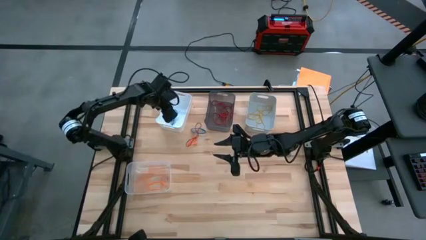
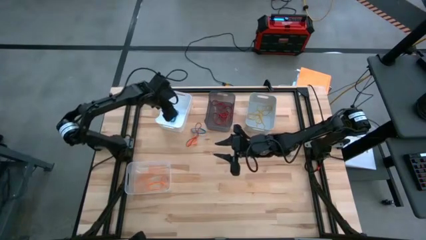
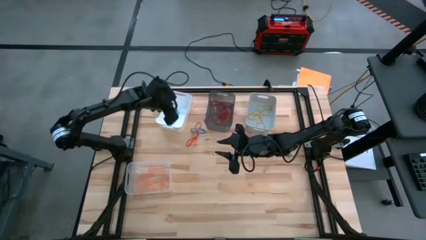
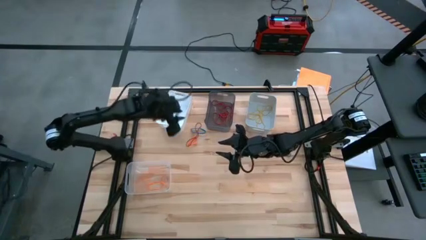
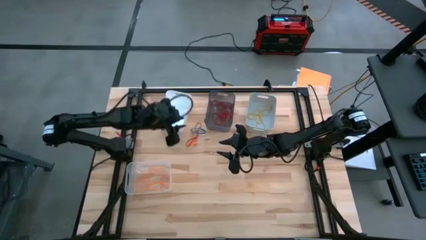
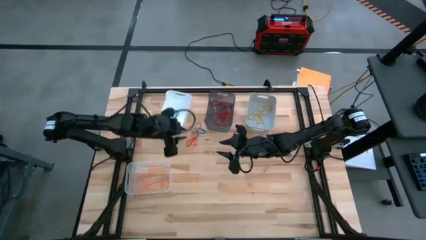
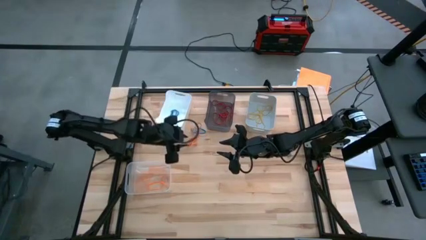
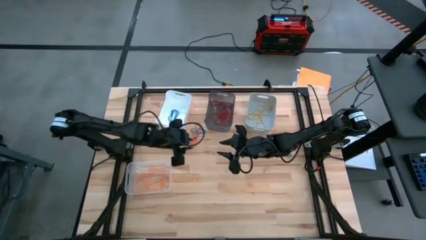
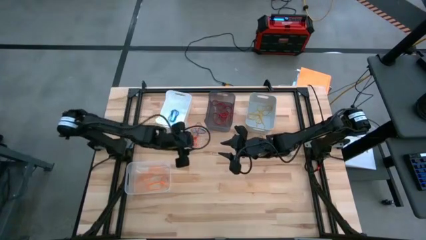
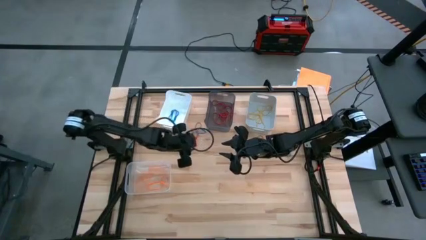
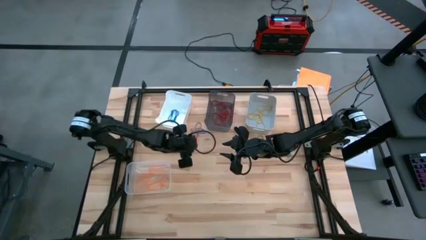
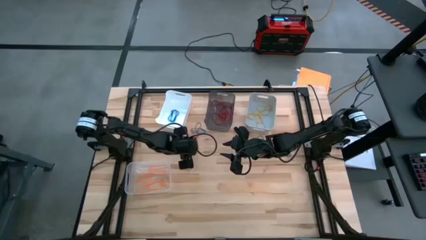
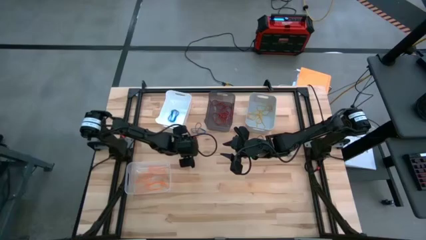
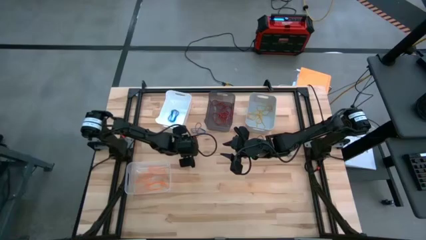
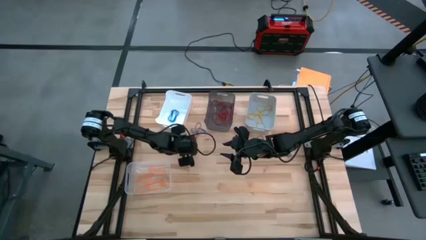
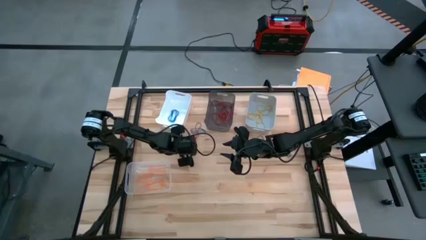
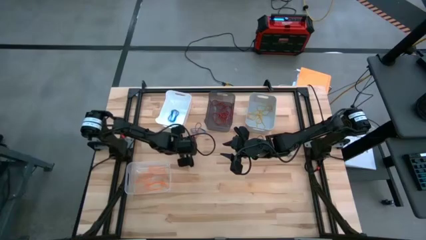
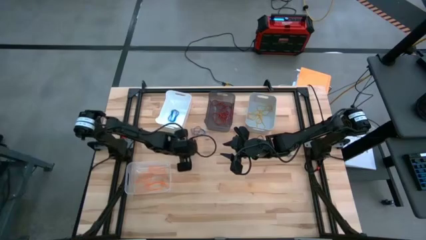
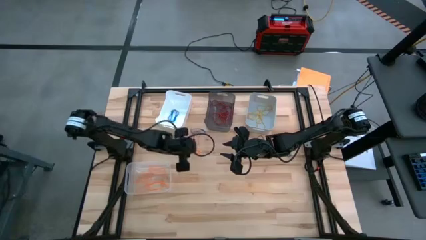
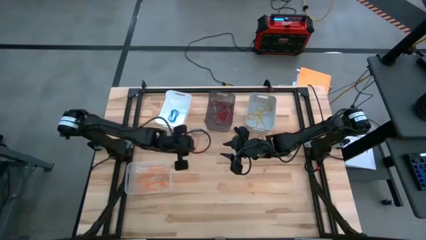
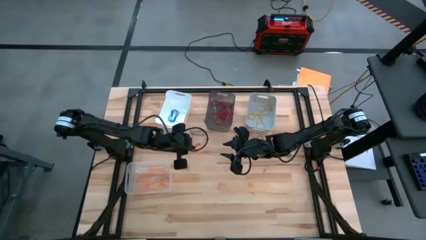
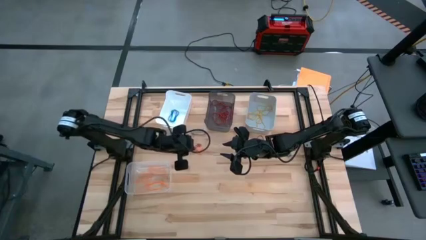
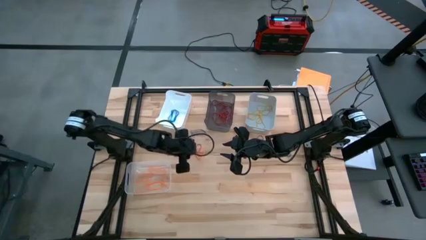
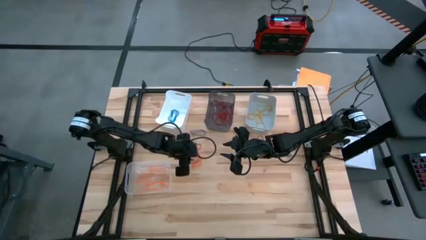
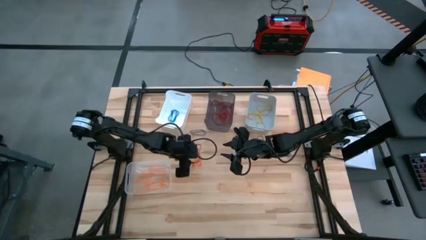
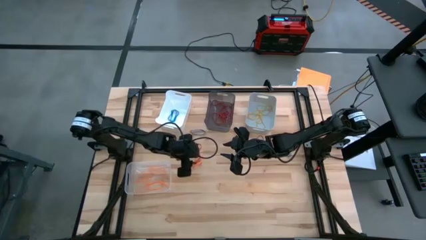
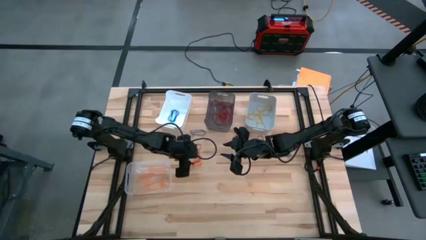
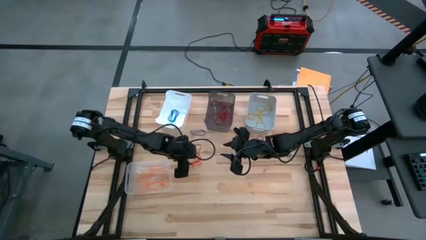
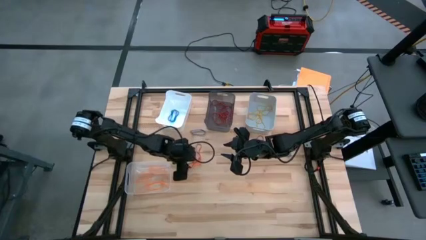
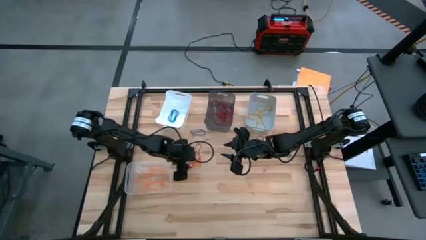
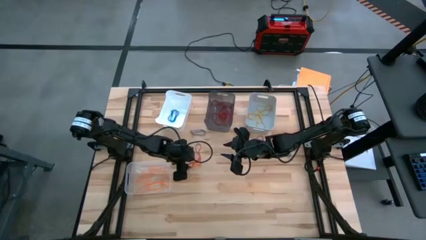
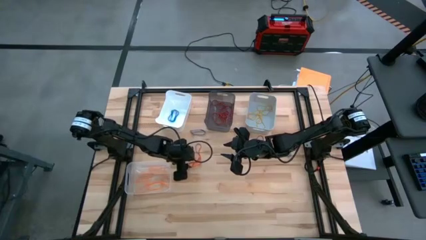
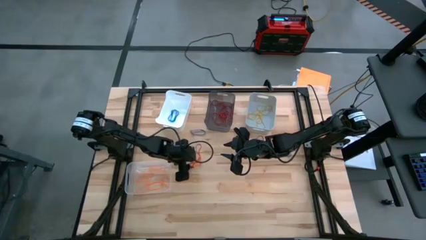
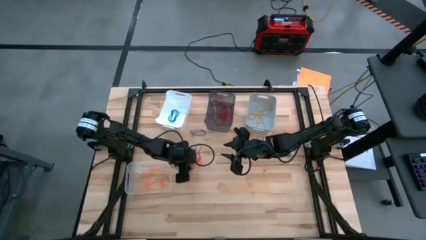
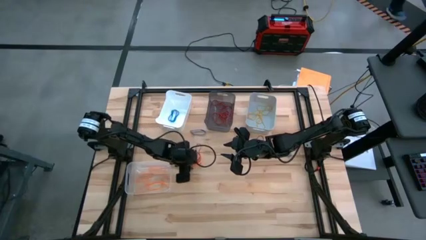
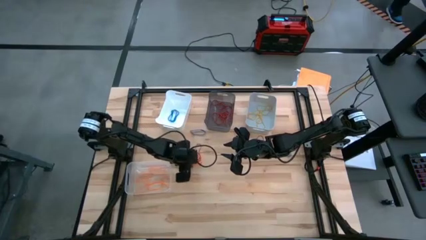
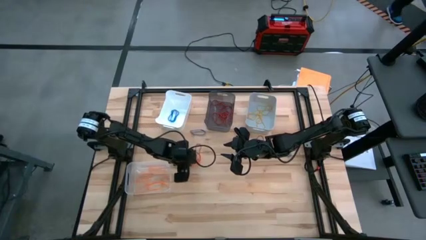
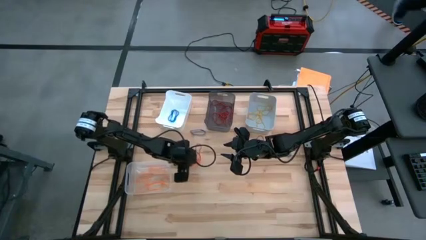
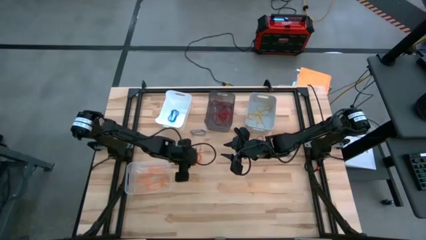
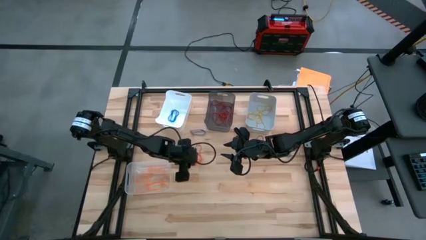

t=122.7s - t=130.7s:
Task: Sort rubber bands into baskets
Put the red rubber band into the black bin

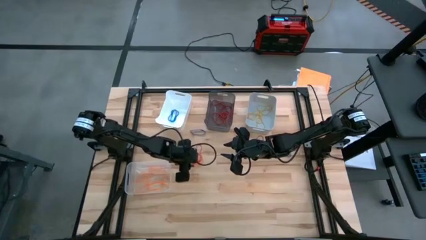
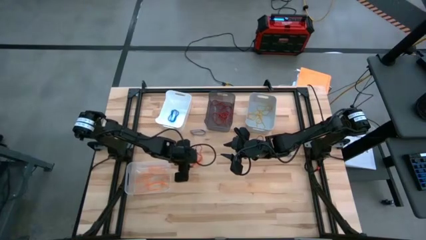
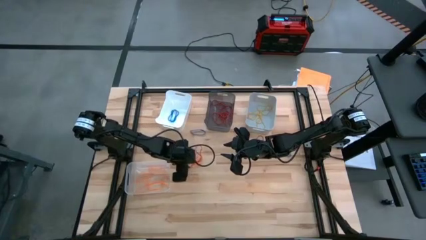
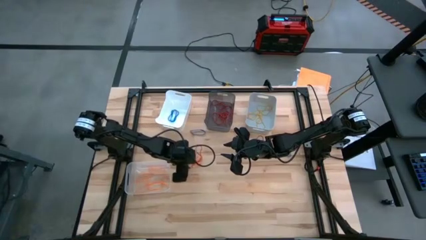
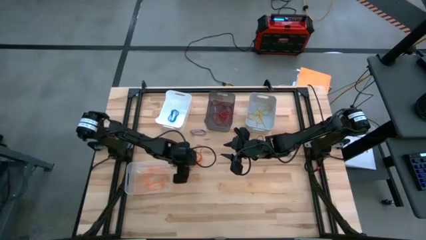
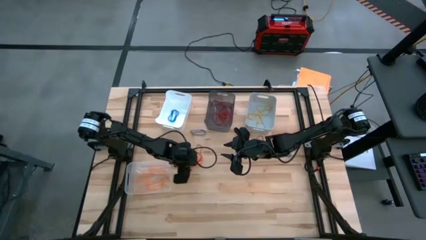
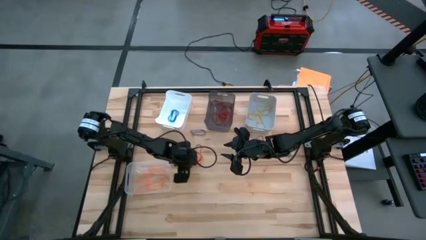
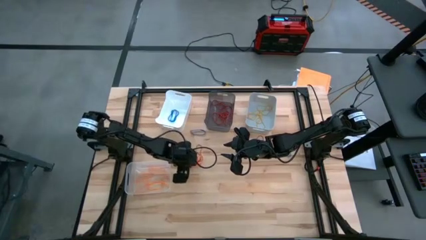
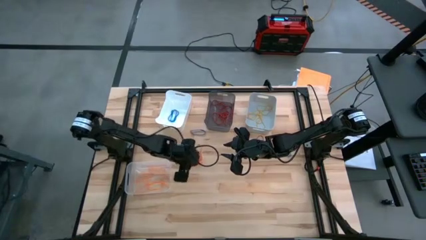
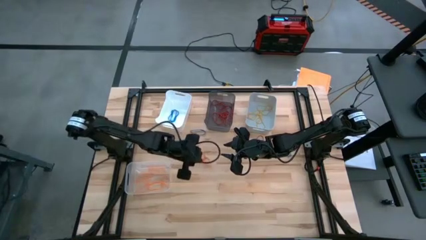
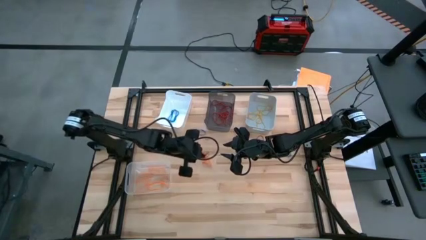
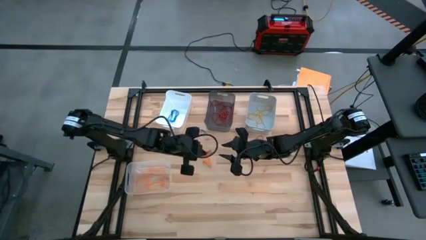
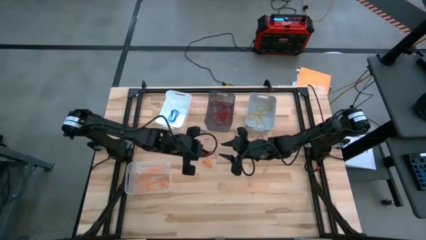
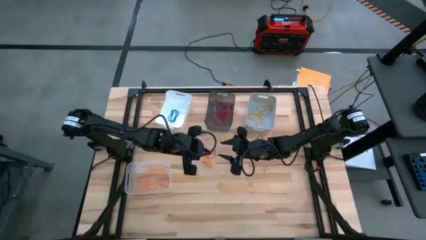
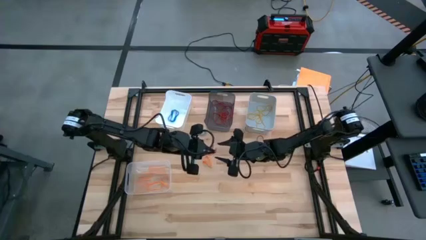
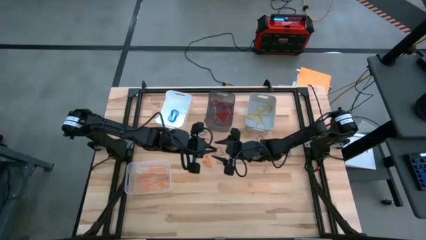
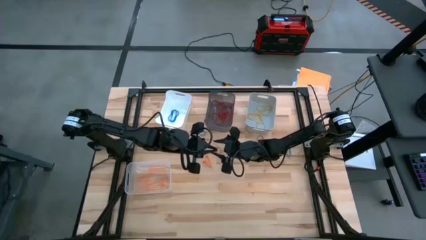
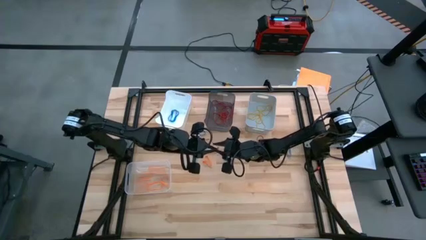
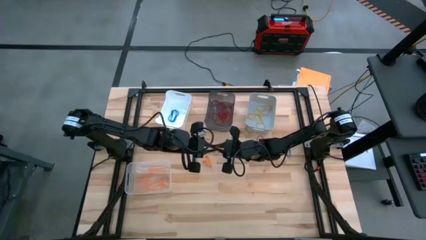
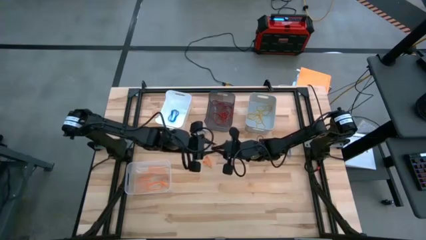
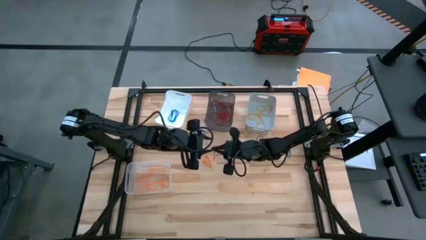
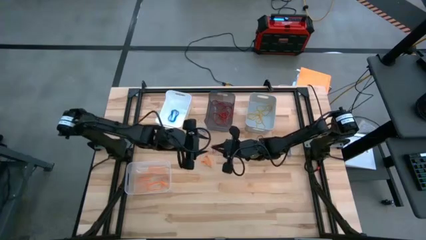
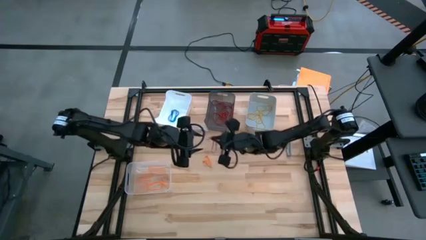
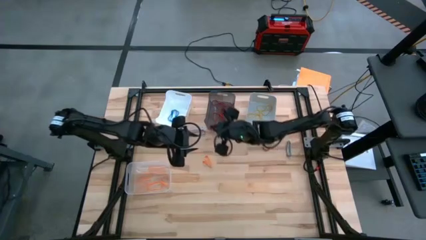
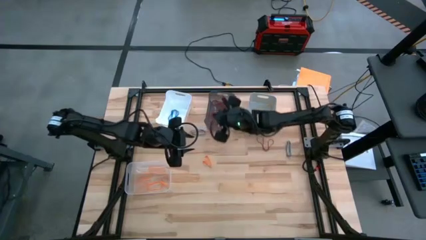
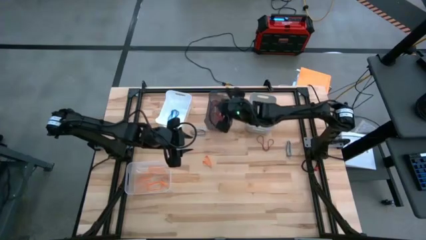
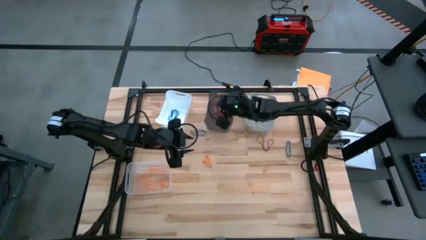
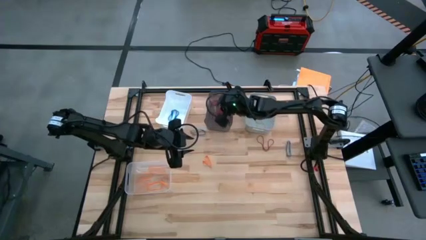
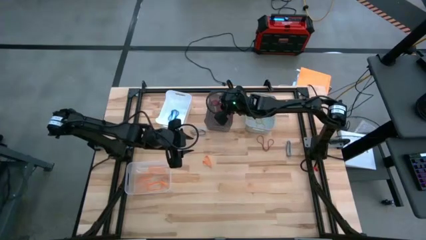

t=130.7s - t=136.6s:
Put the red rubber band into the black bin

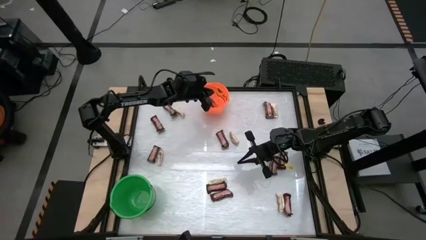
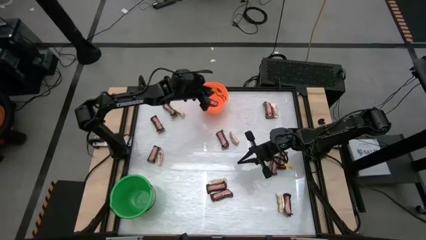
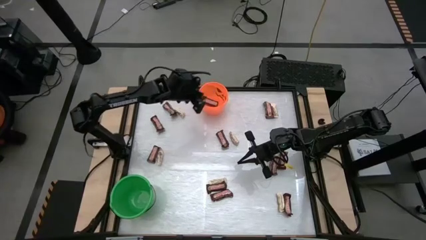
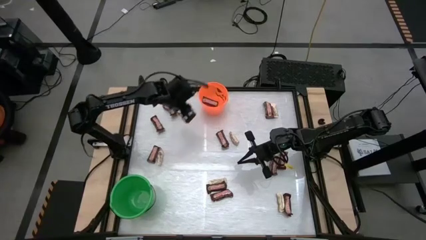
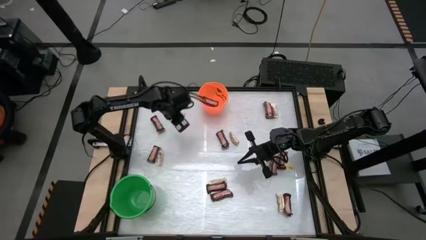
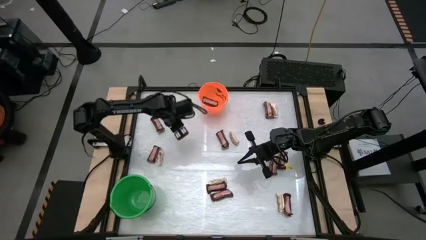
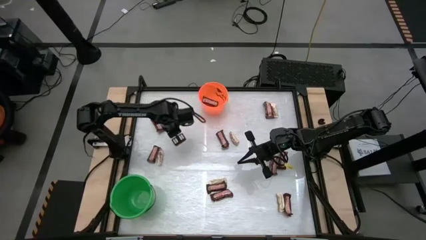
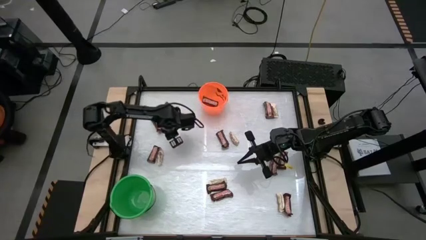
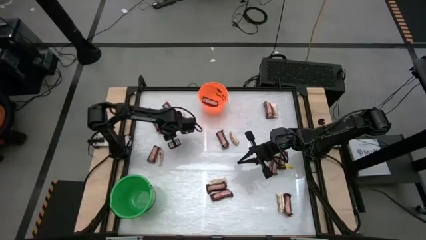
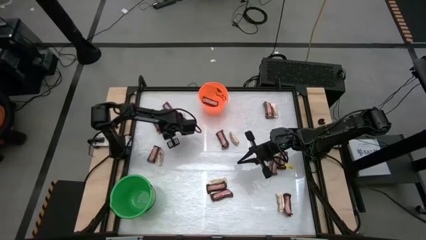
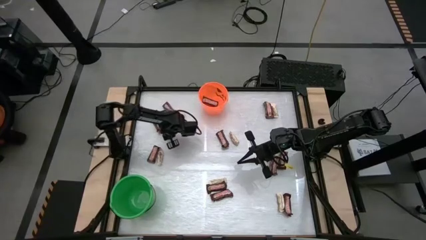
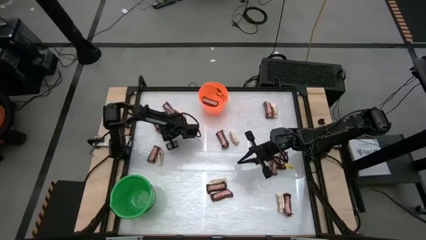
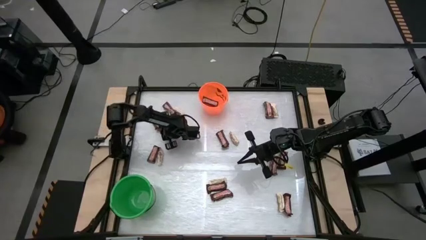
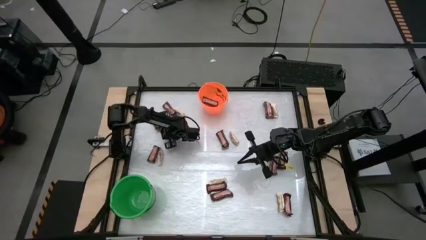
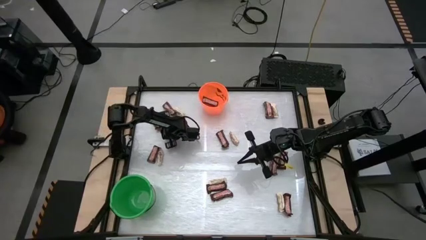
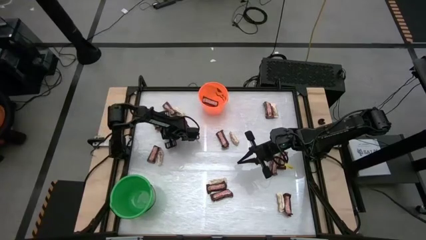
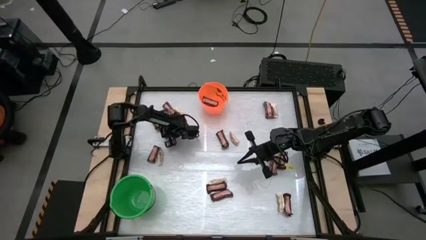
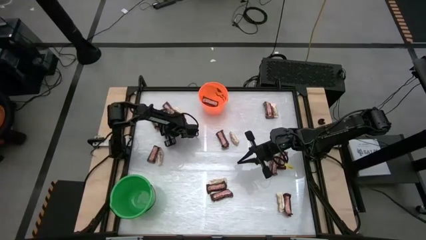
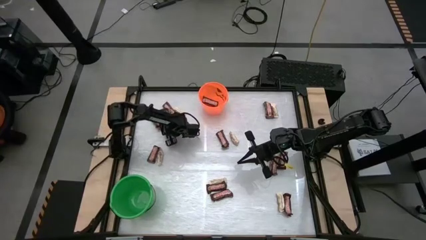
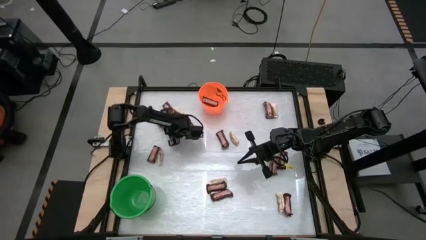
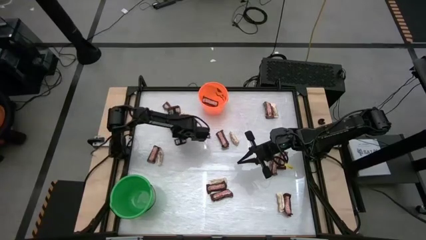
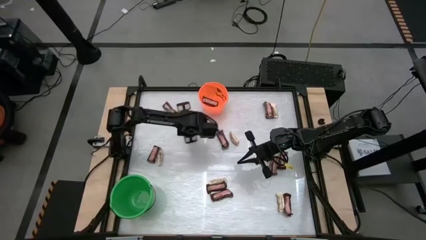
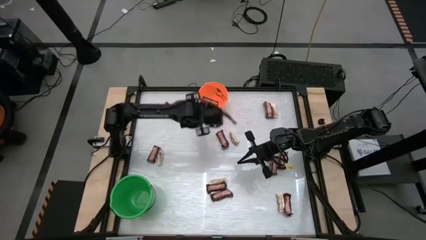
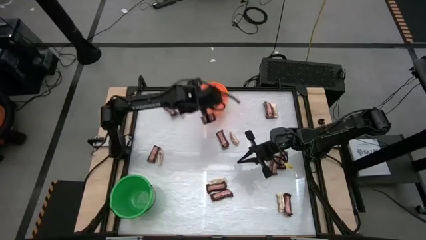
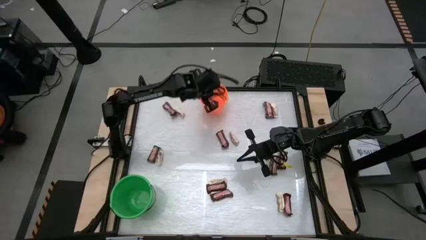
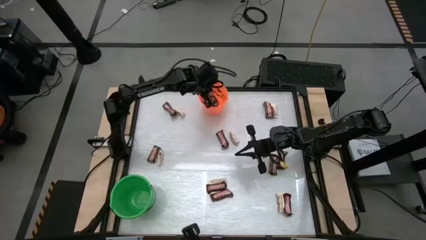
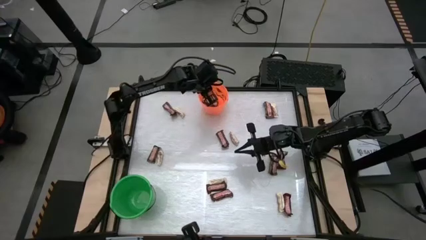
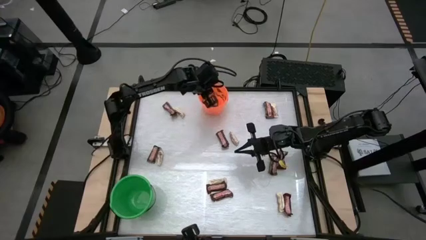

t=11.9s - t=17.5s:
Task: Sort candy by brand, put in halloween buckets
Put the brown chocolate bar into the orange bucket
